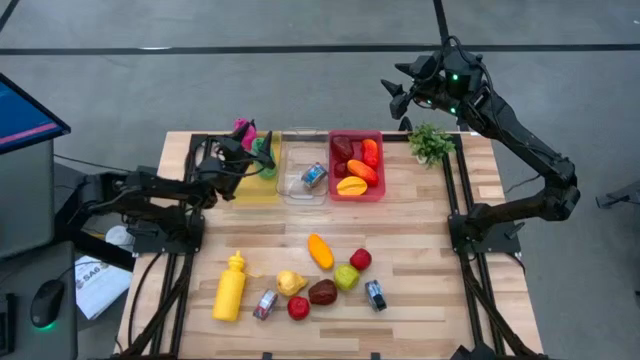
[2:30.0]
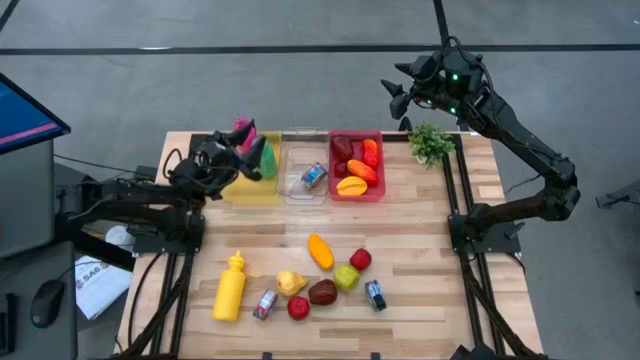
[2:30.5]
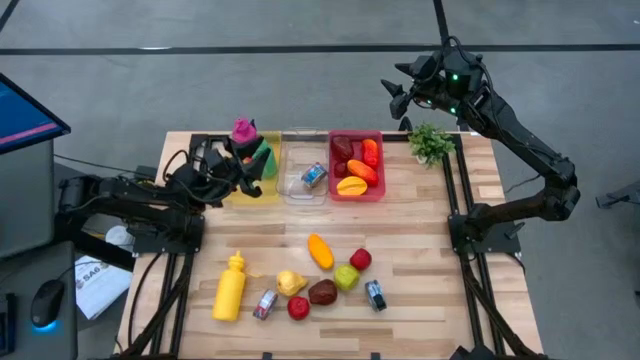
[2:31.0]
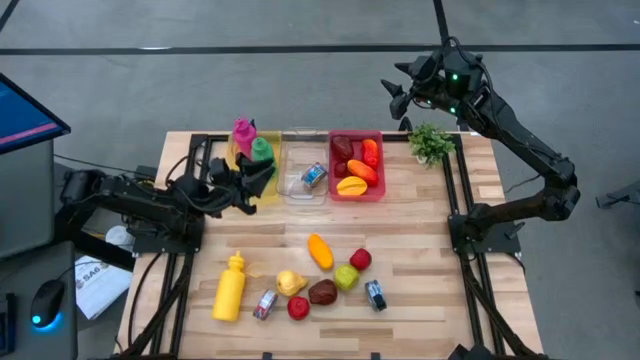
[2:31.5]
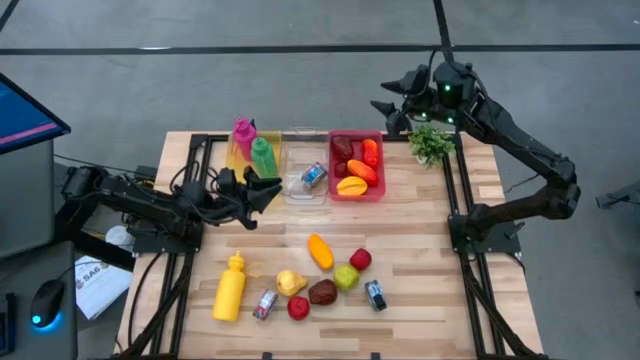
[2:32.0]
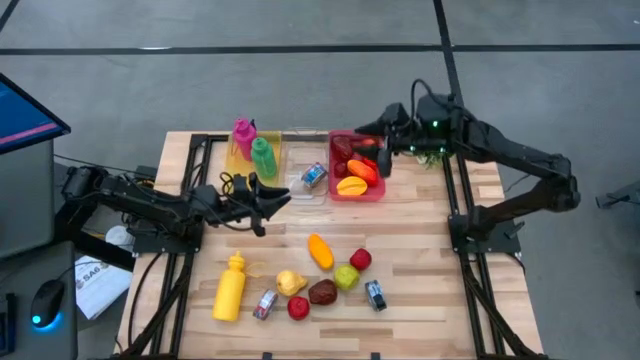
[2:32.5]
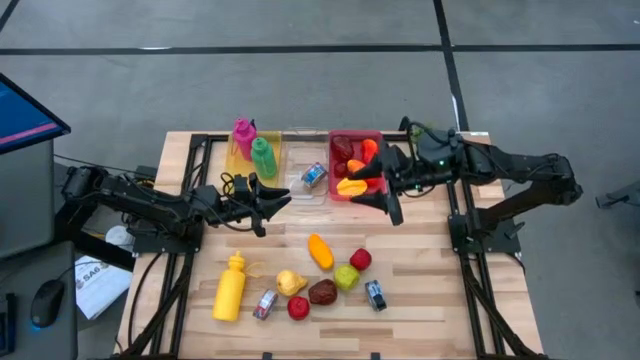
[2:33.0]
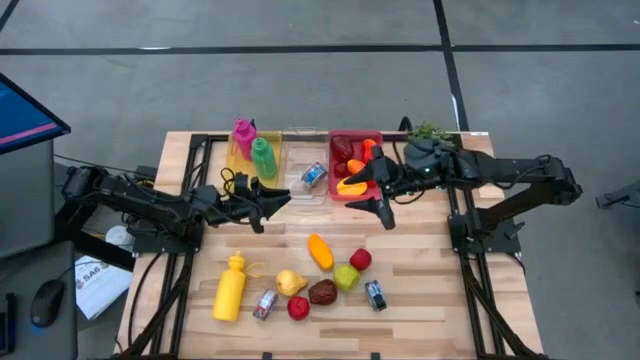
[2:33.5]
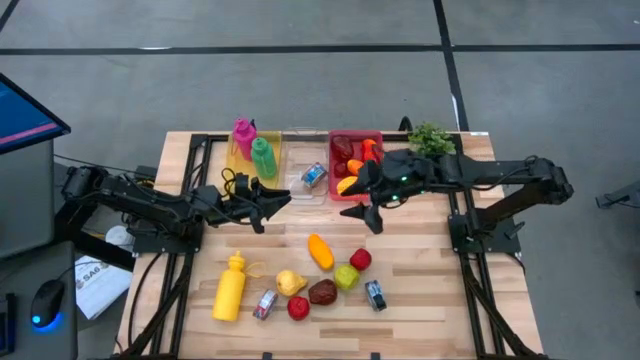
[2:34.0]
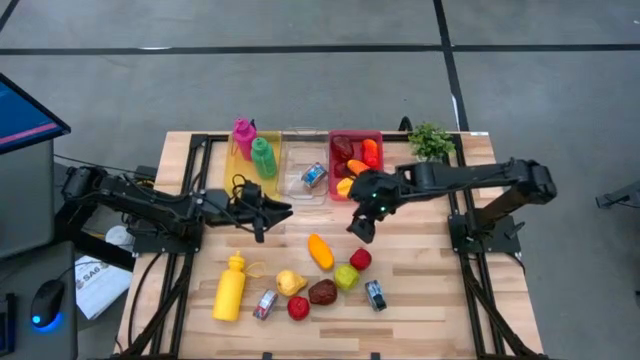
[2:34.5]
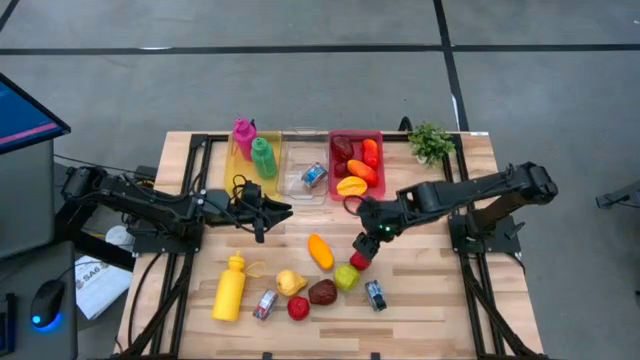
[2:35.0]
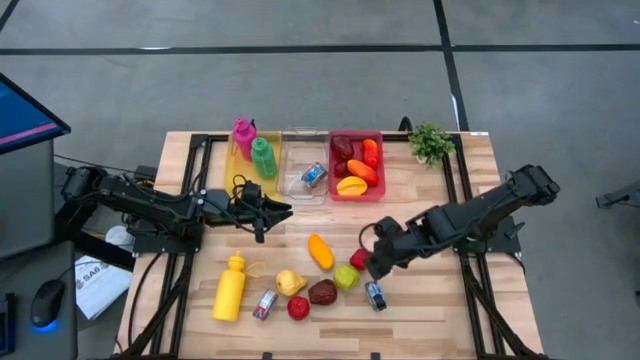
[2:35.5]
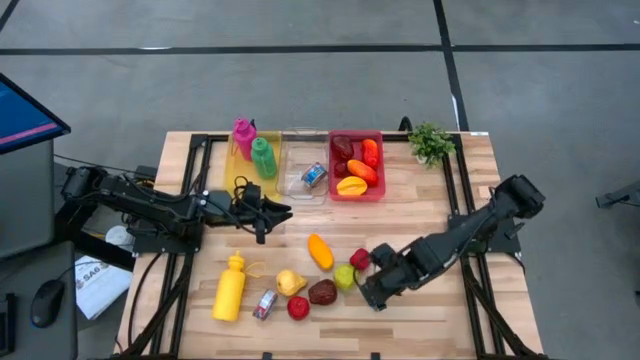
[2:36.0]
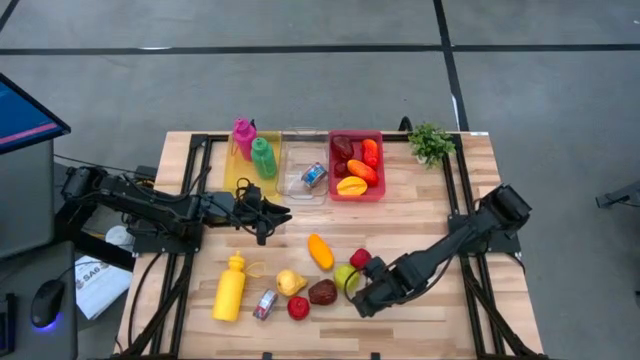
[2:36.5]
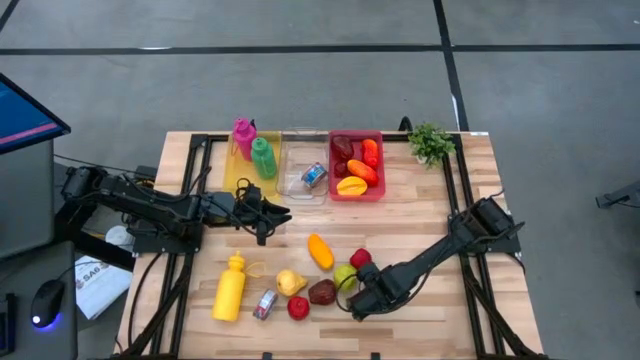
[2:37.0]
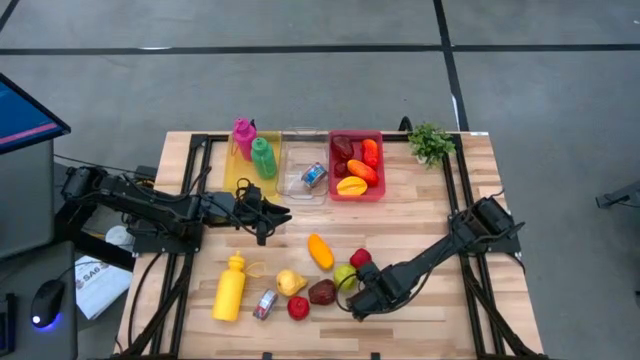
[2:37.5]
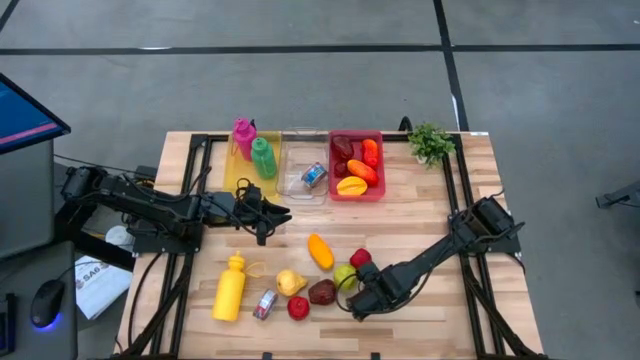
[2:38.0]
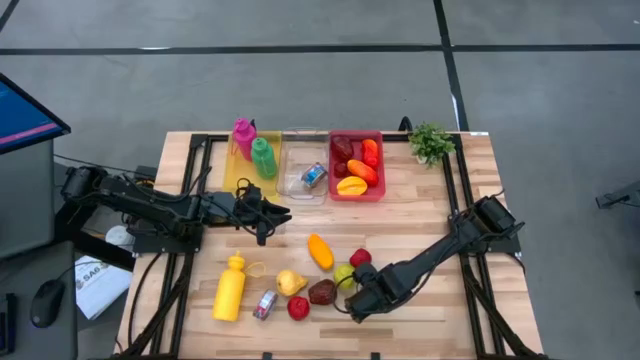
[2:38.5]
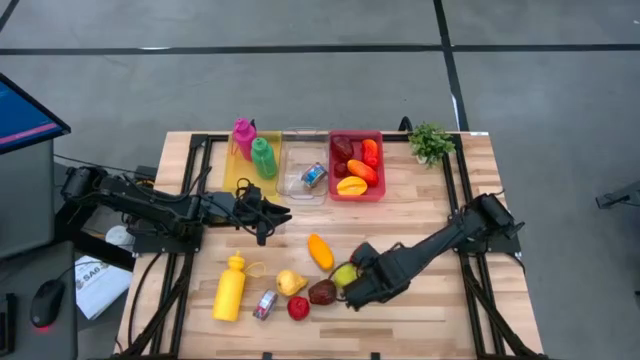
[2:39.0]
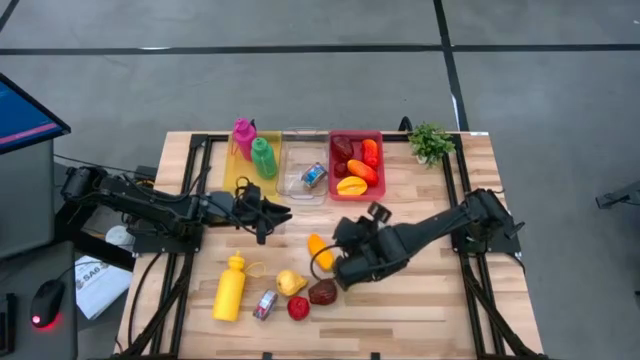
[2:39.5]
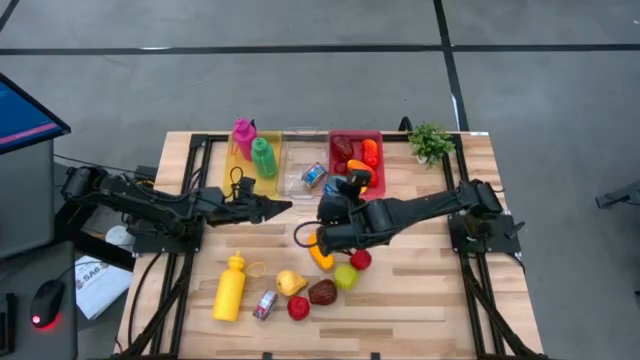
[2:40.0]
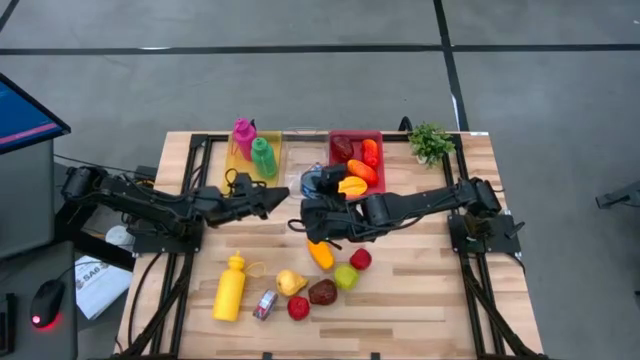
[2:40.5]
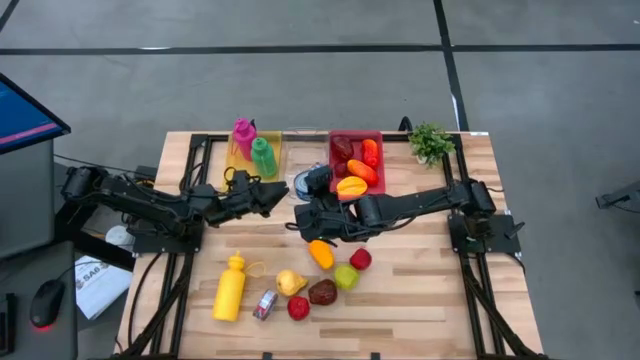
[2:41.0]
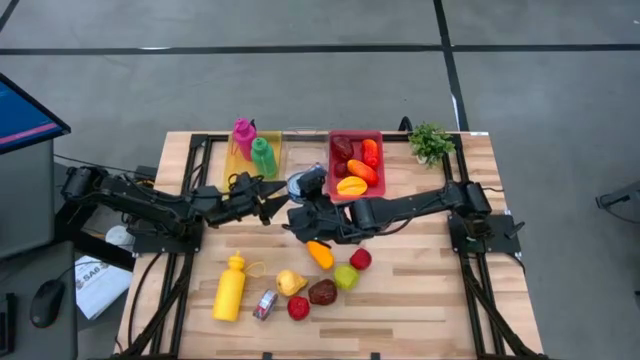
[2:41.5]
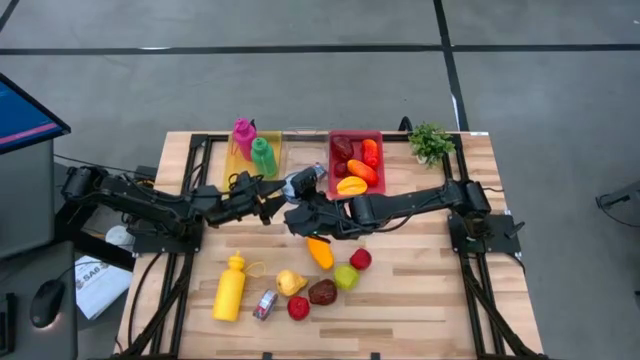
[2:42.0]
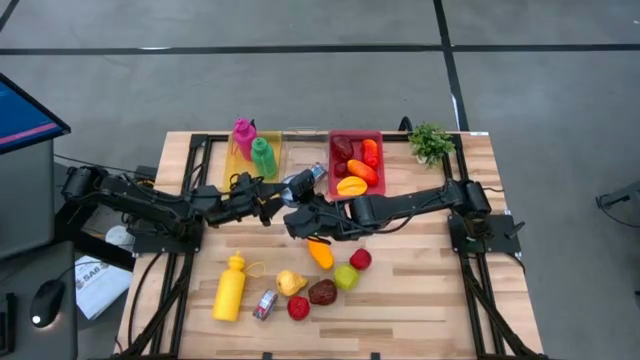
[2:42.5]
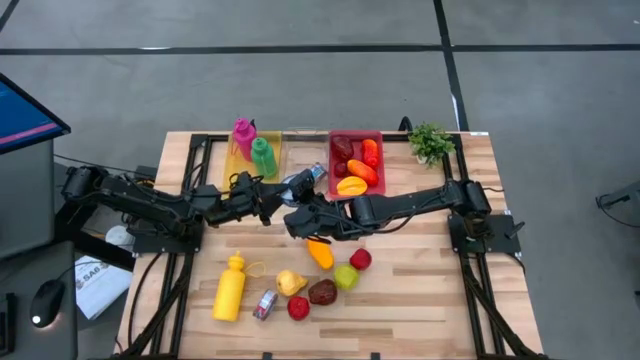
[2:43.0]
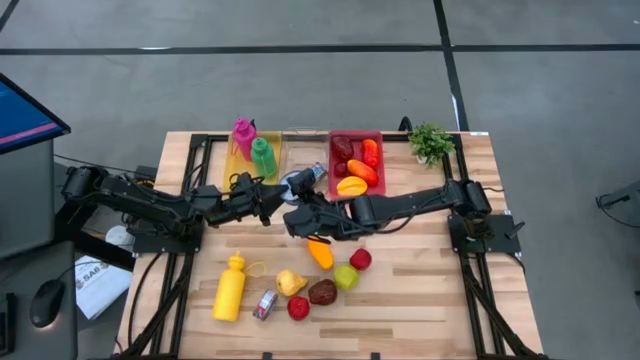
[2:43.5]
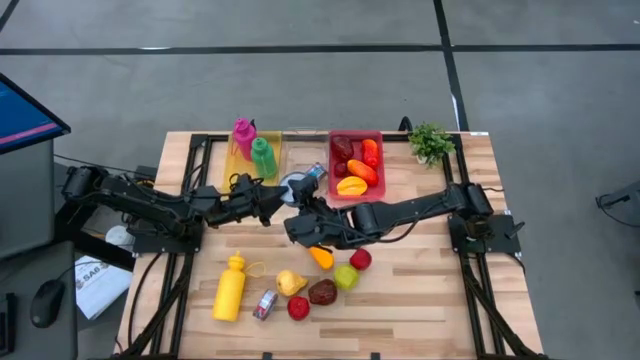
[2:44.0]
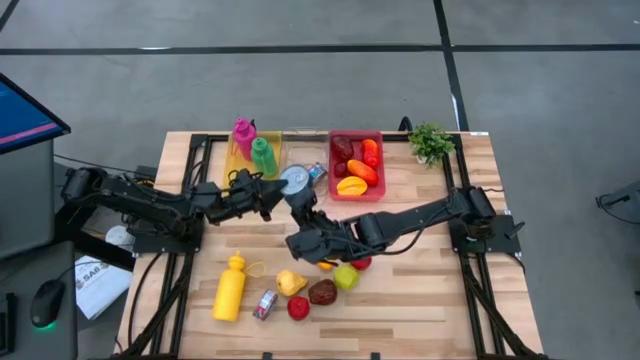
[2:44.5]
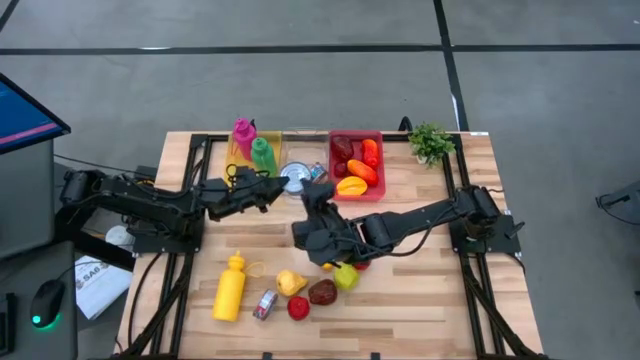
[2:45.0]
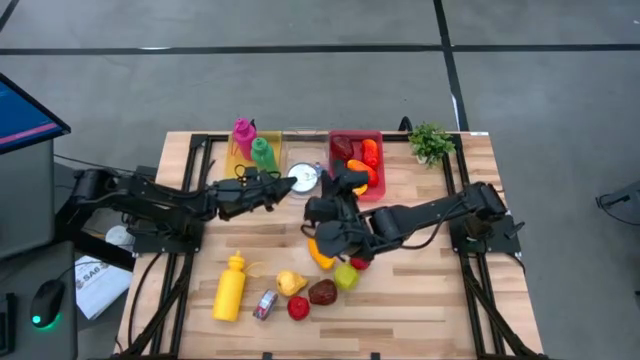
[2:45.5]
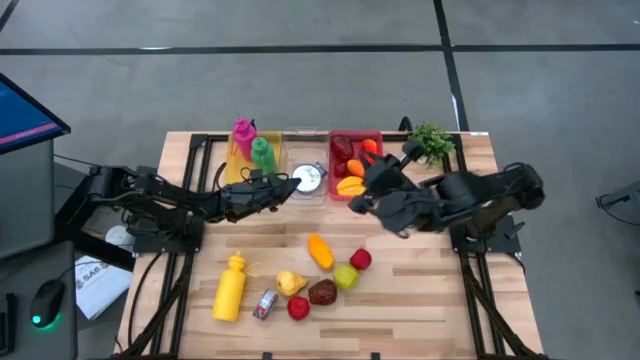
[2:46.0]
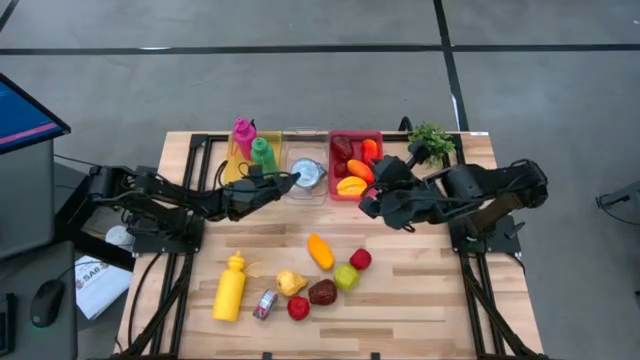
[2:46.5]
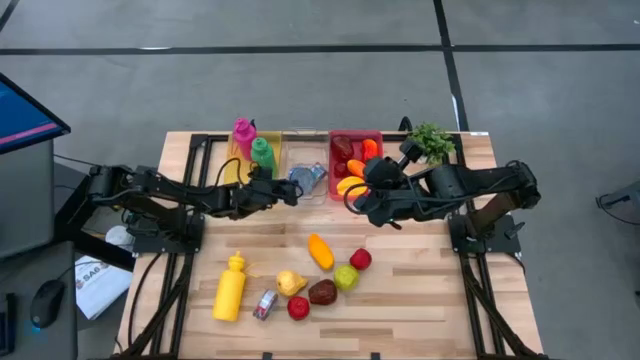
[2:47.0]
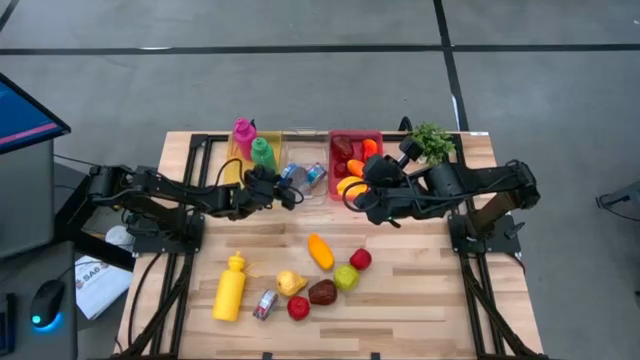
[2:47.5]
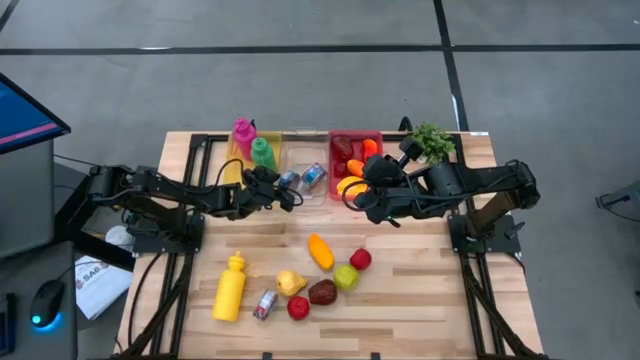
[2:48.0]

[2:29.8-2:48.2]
Task: Pick & Place Food Item
Put the blue tuna can into the transparent bin

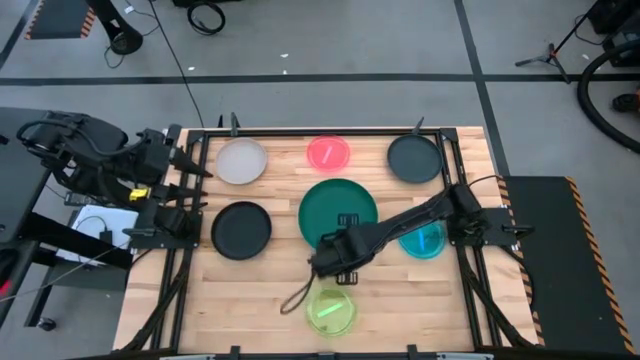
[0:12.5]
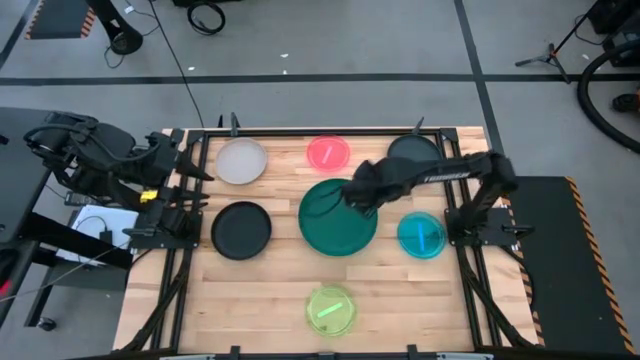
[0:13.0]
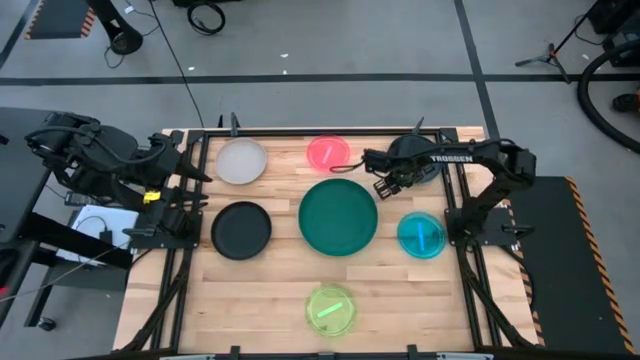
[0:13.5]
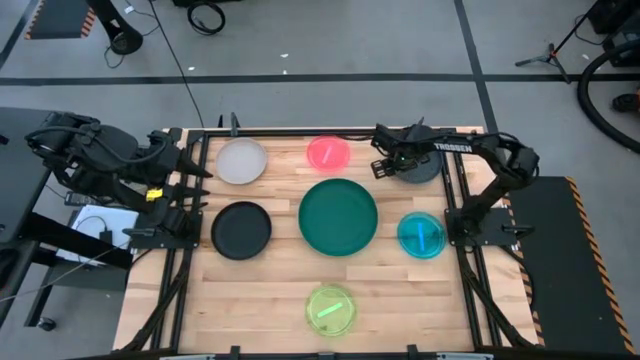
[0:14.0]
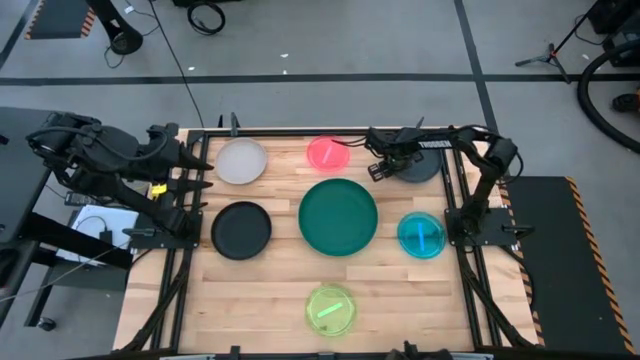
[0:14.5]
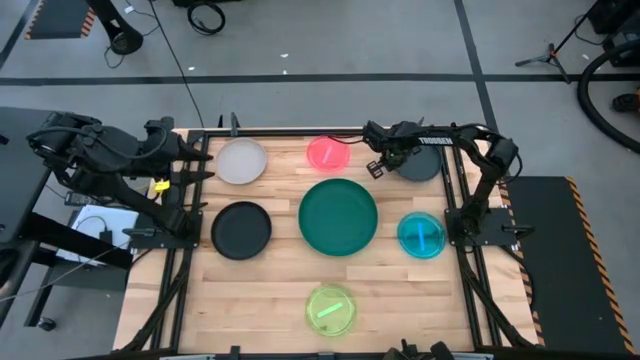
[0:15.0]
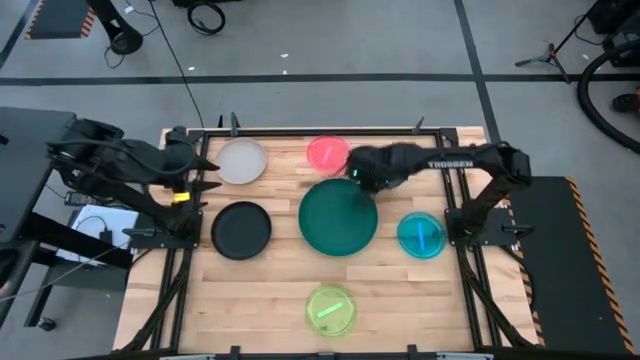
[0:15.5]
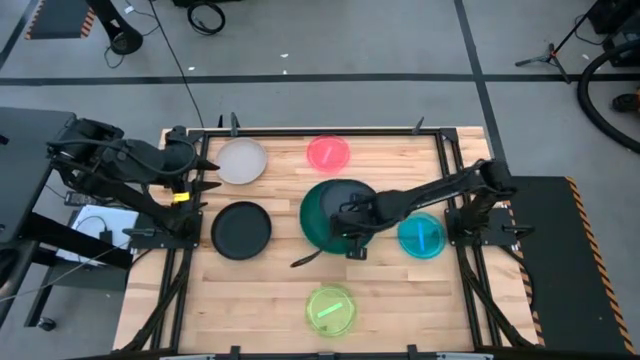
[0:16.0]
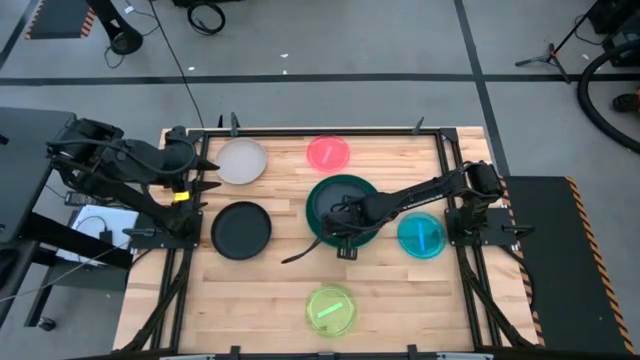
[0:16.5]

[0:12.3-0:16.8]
Task: Stack plastic plates
Stack the right black plate on top of the dark green plate
